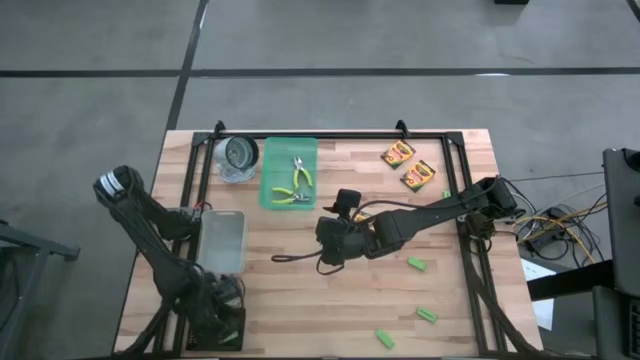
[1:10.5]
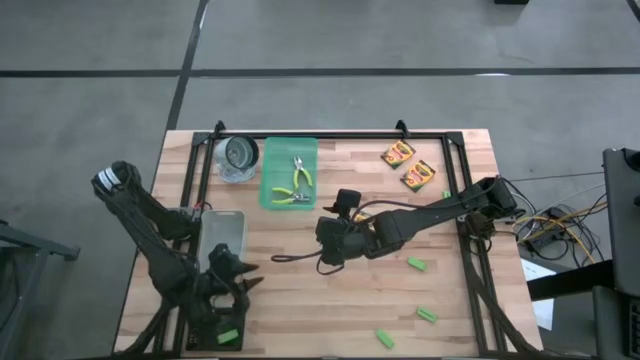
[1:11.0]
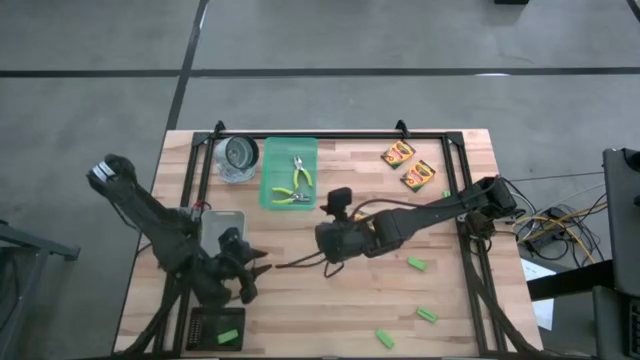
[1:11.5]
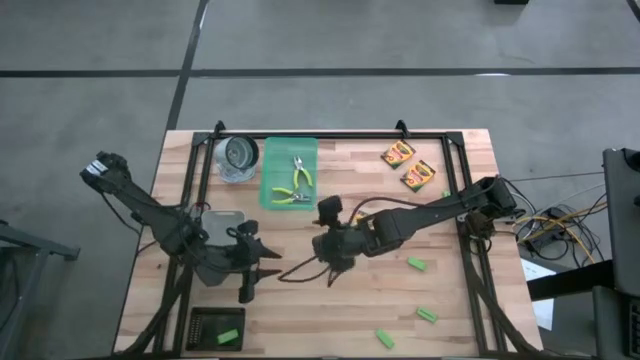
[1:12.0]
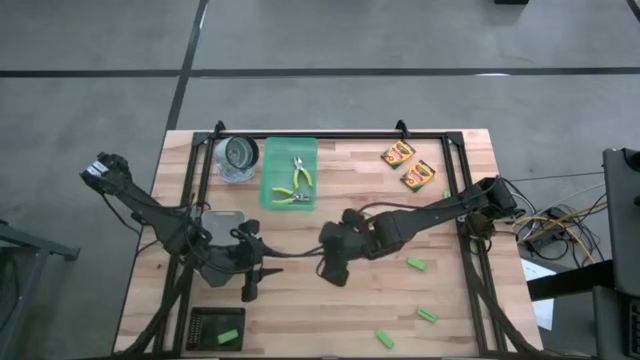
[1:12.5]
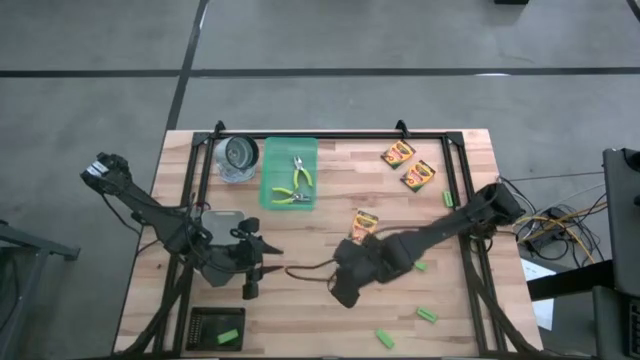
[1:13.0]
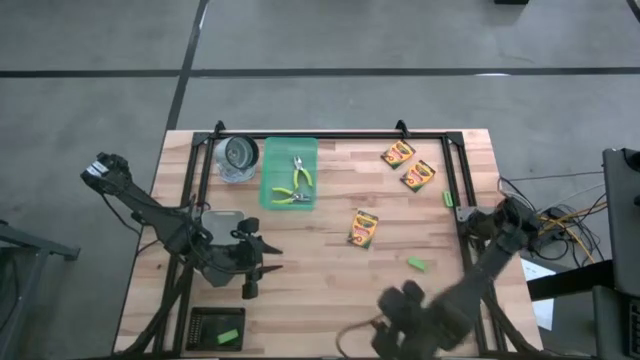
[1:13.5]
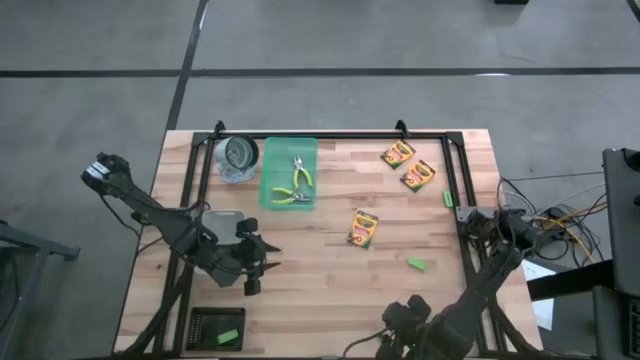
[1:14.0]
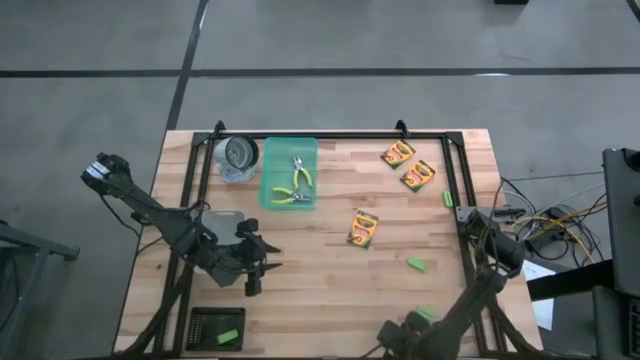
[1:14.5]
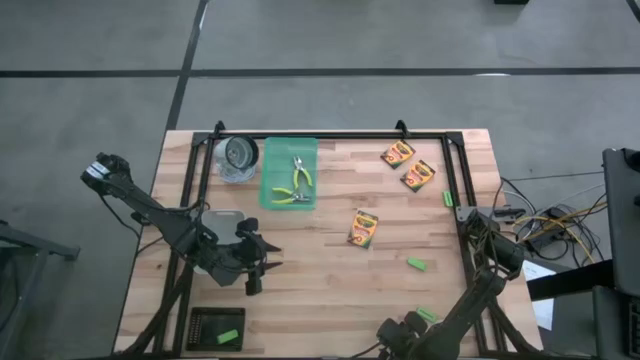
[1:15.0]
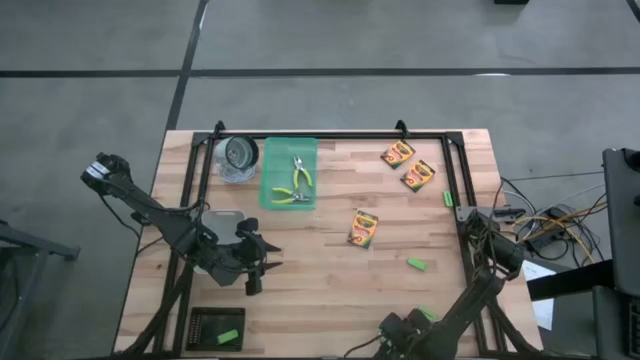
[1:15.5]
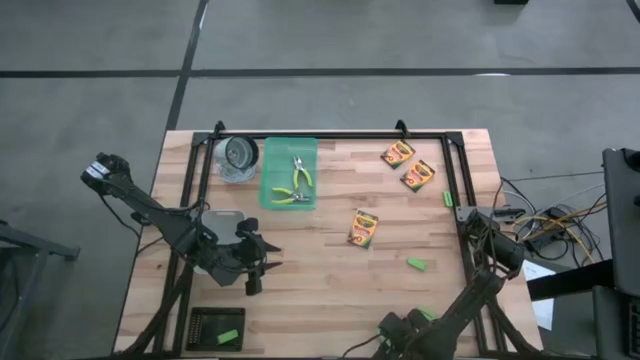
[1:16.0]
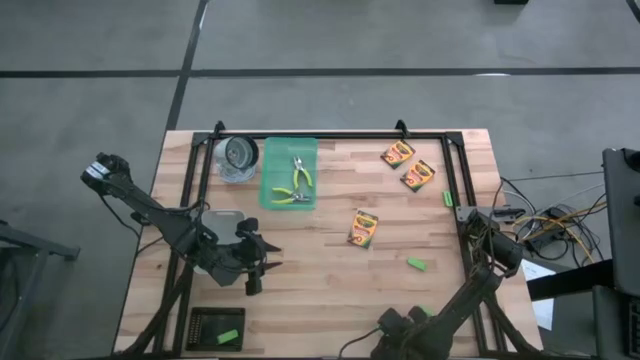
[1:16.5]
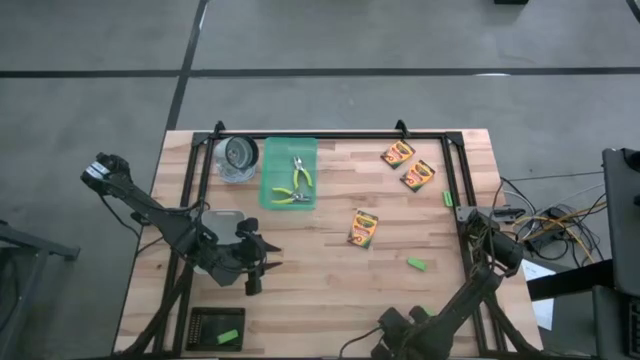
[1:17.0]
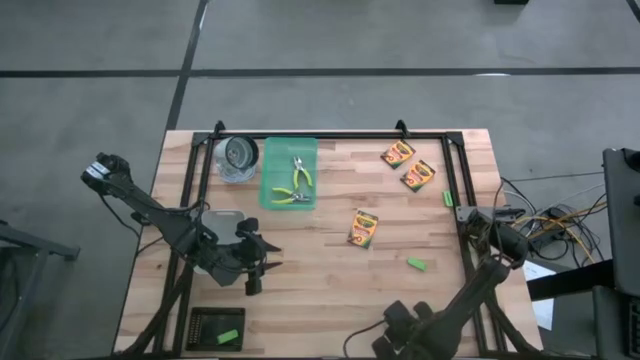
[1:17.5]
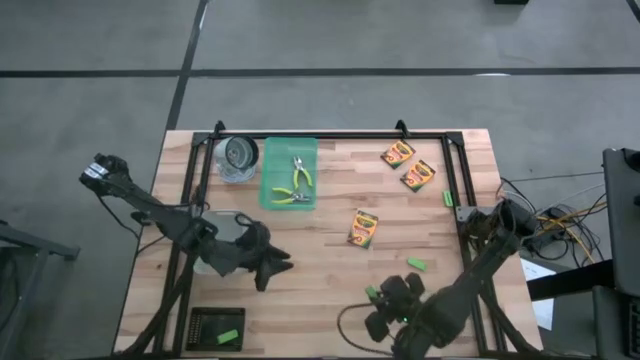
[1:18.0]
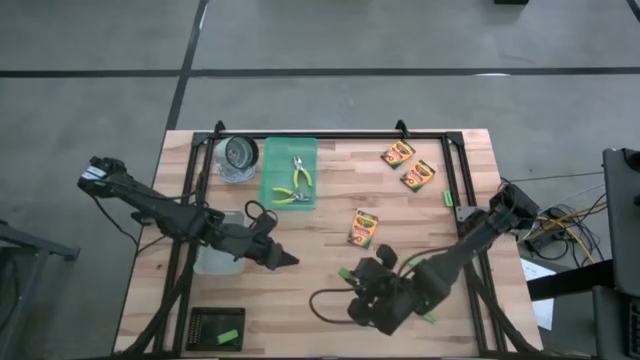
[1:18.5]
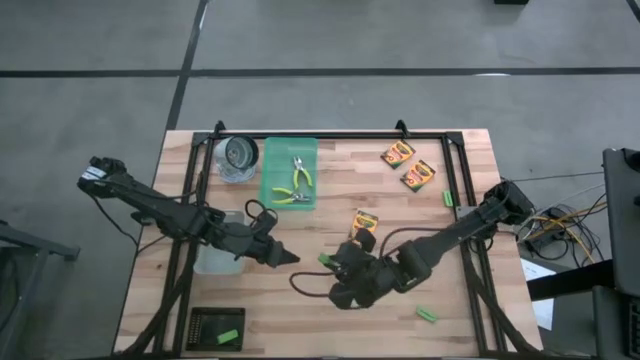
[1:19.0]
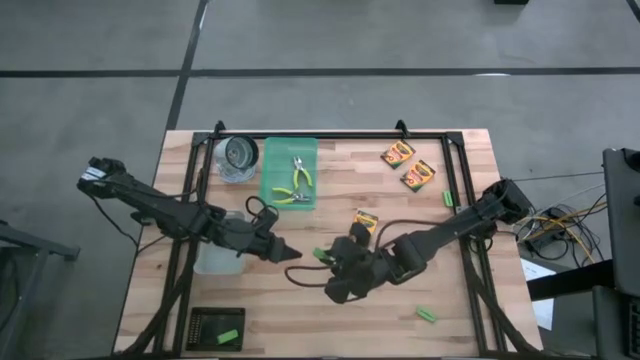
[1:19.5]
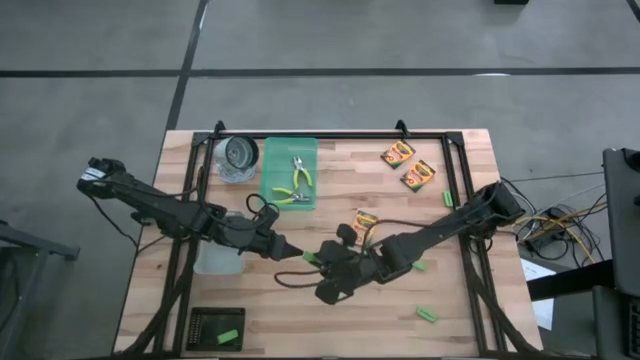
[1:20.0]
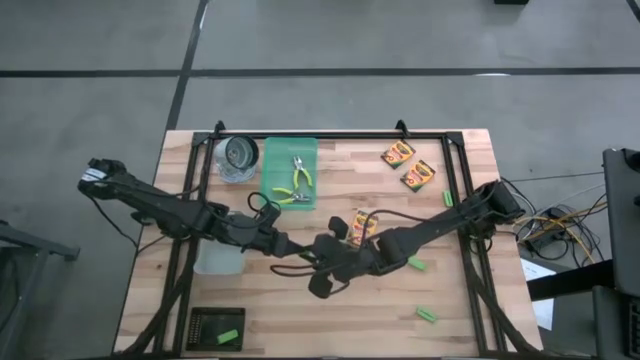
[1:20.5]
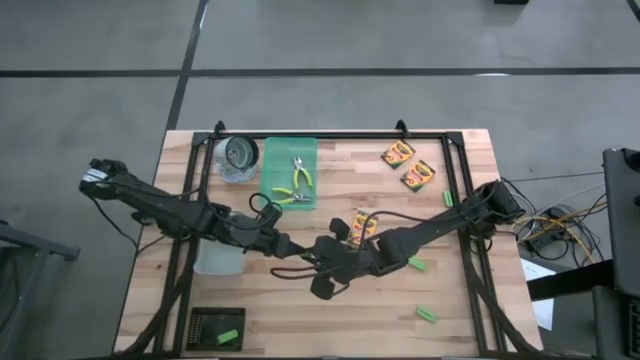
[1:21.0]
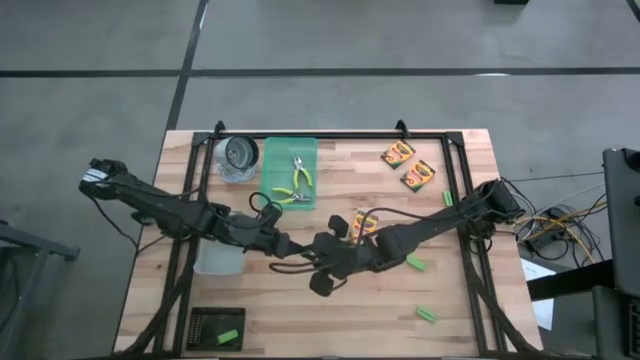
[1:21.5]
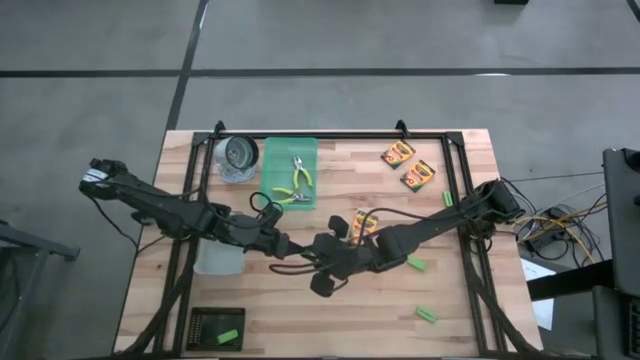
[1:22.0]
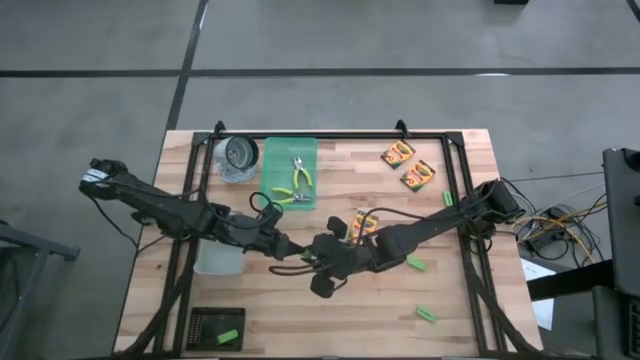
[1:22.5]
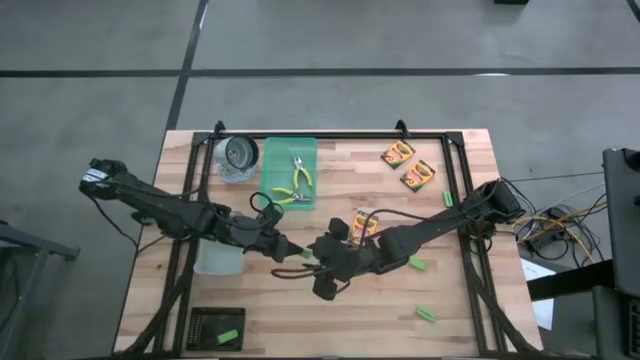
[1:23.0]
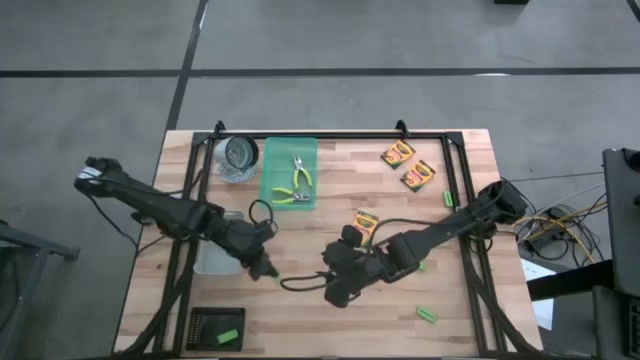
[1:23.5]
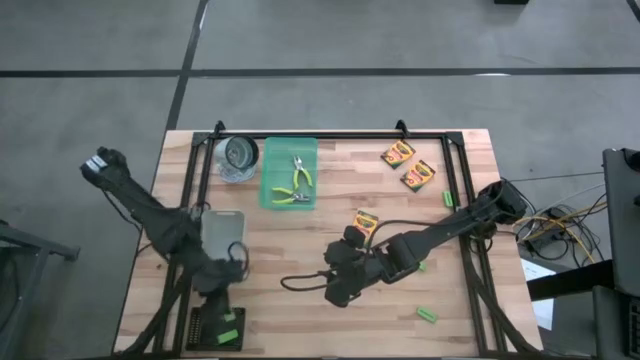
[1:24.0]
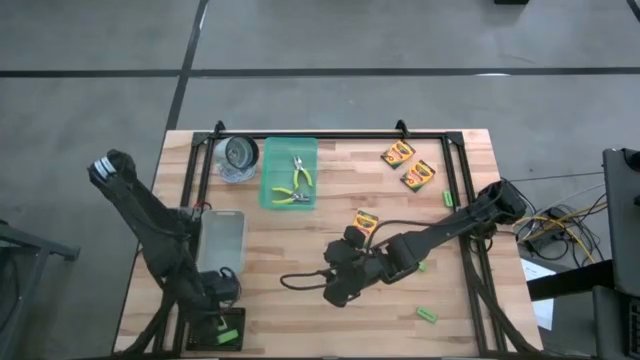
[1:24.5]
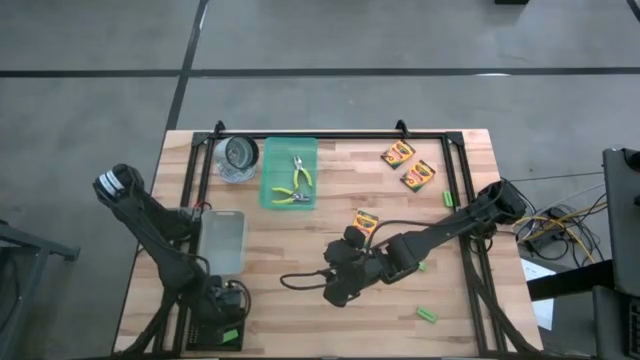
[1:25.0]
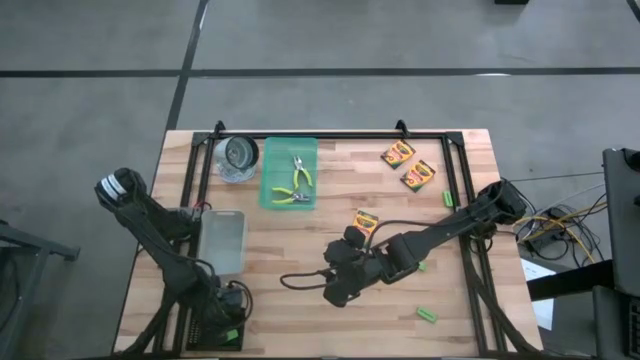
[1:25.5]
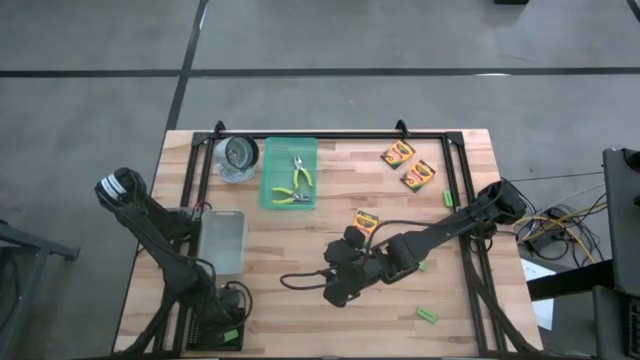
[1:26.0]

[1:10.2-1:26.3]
Task: Pick & Place School Supplies
Put the green eraser into the black bin

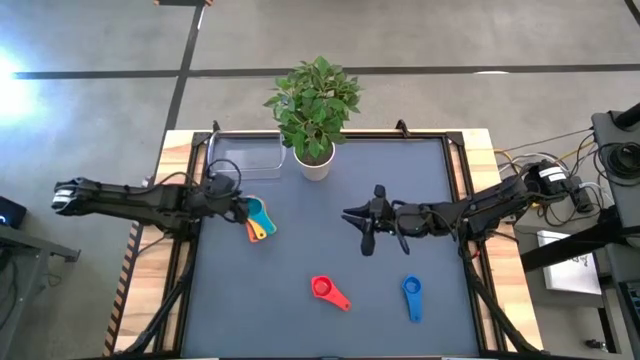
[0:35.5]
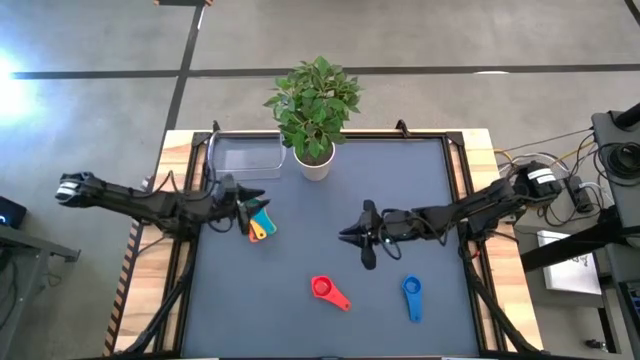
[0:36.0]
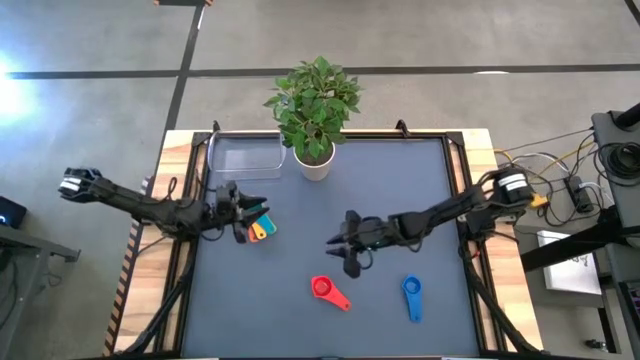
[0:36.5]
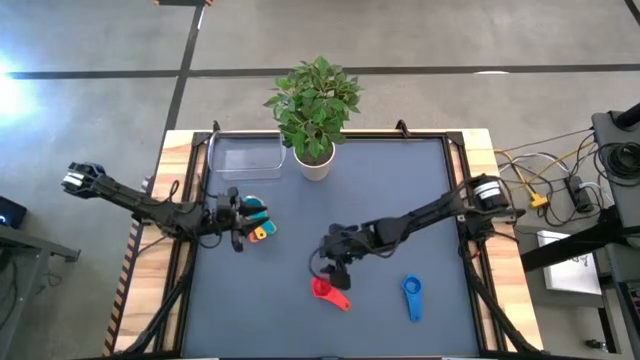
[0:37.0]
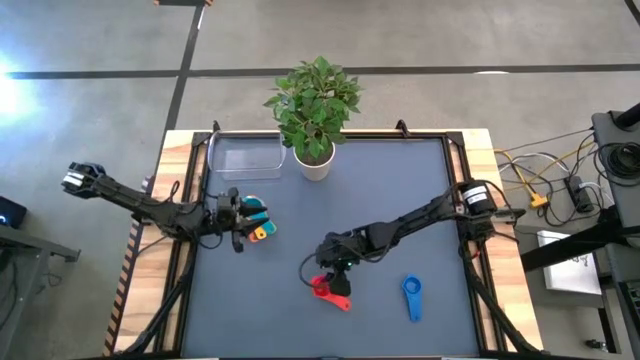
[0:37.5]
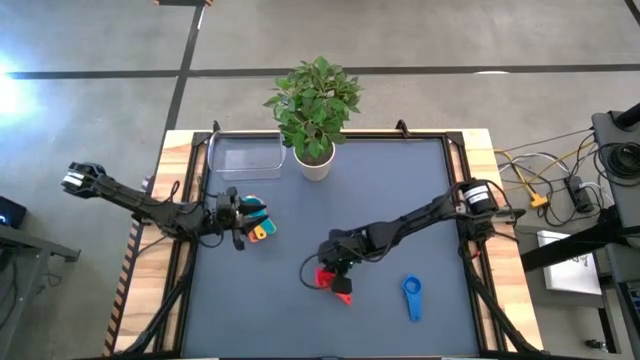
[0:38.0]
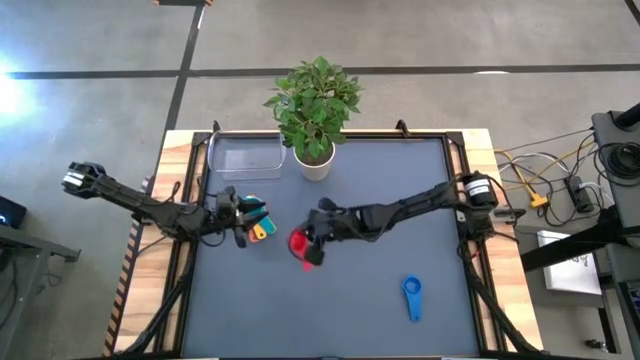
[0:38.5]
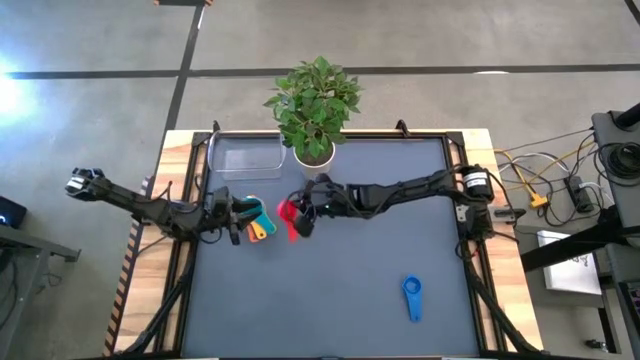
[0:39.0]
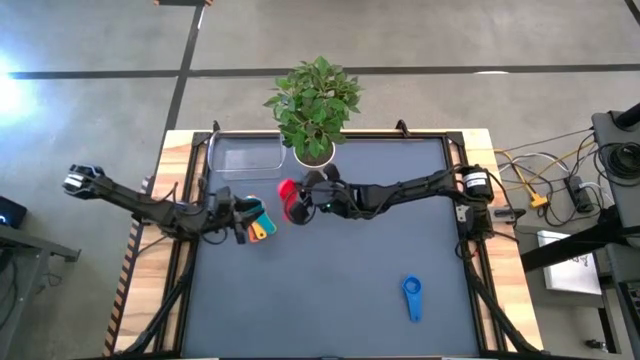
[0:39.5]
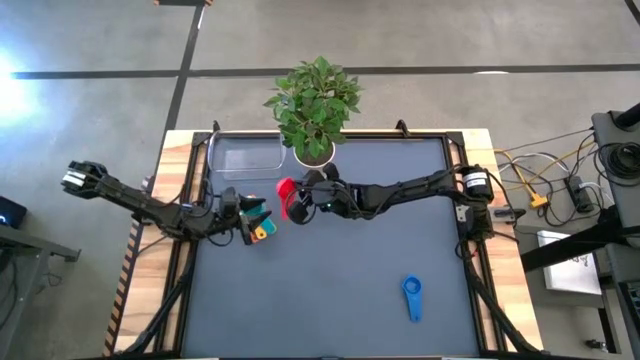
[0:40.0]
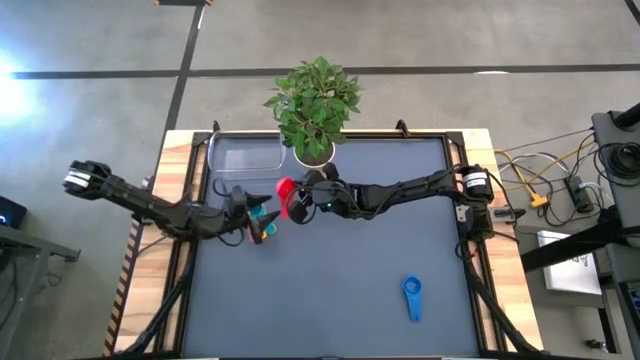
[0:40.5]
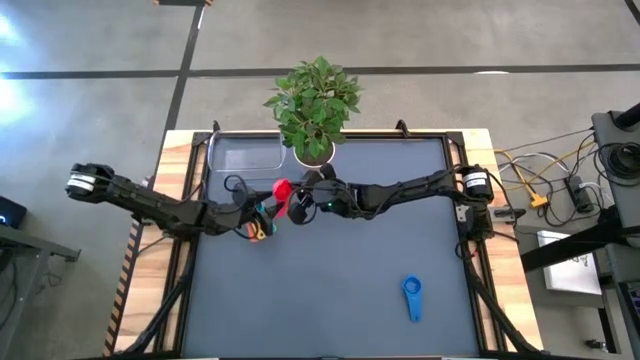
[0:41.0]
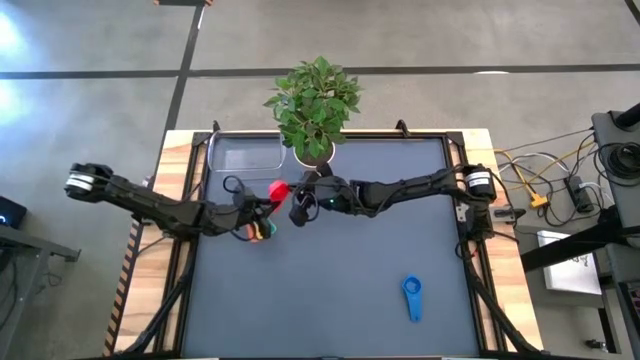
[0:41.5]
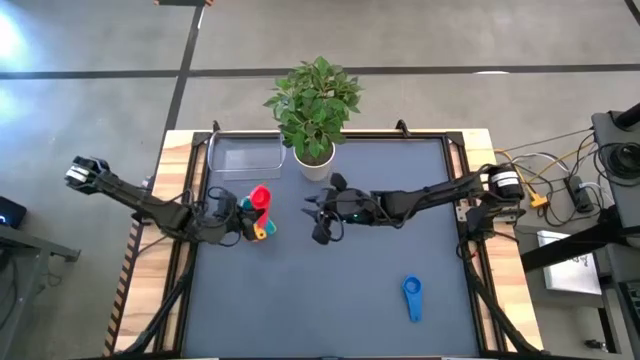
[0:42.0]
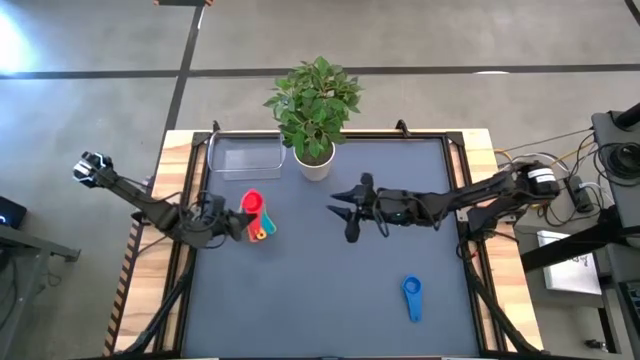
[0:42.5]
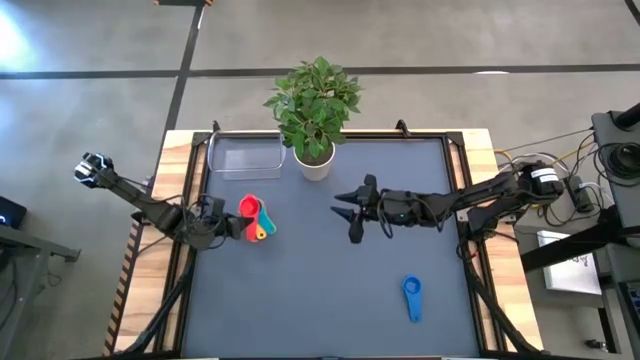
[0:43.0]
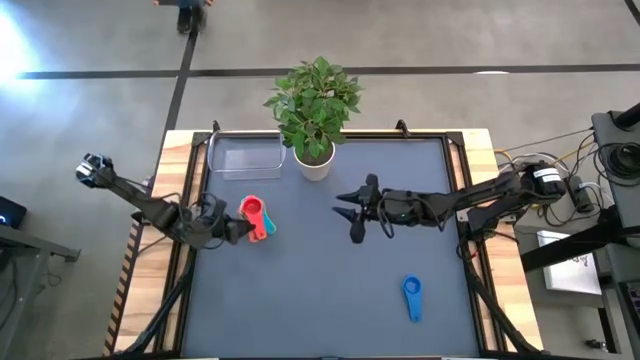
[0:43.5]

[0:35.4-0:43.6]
Task: Nest measuring cups in basket
Stack the red measuring cup on top of the light blue measuring cup
